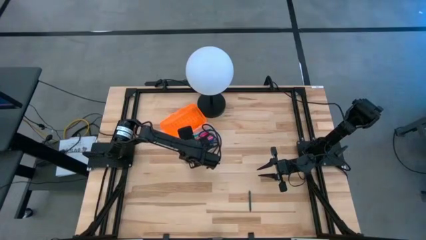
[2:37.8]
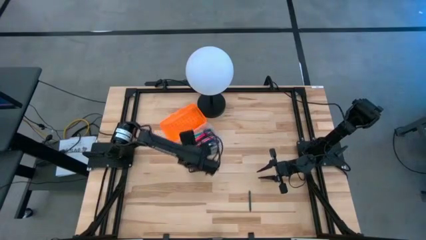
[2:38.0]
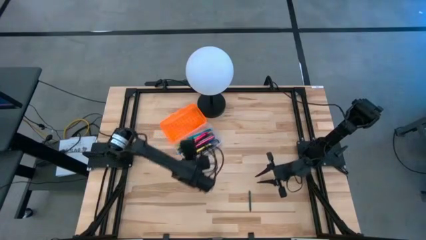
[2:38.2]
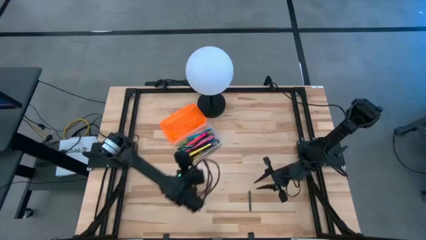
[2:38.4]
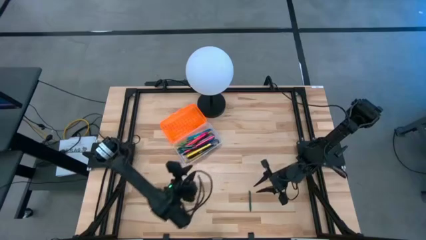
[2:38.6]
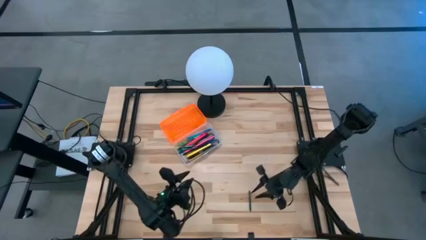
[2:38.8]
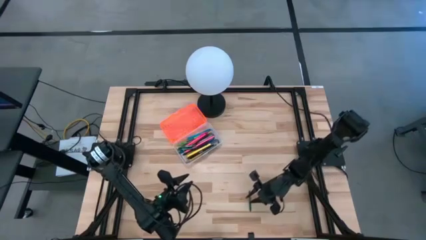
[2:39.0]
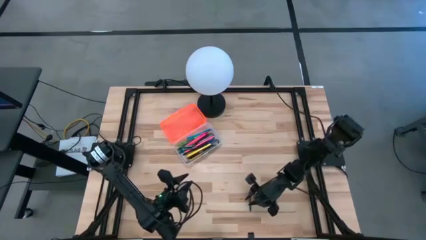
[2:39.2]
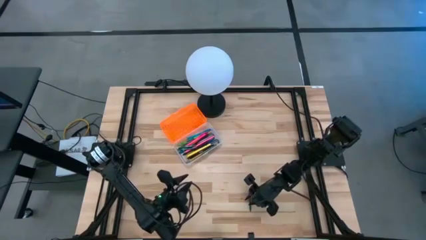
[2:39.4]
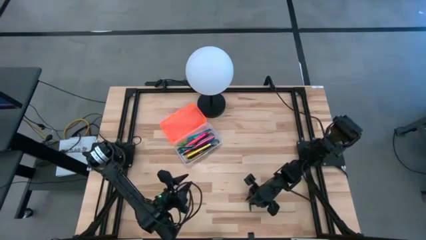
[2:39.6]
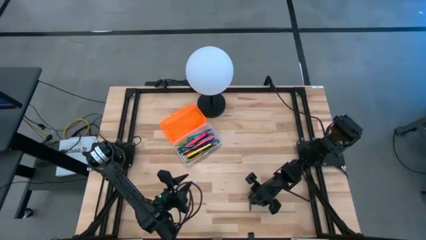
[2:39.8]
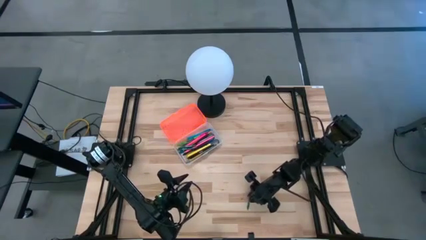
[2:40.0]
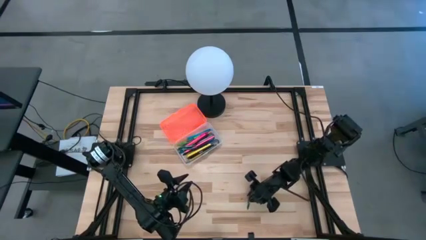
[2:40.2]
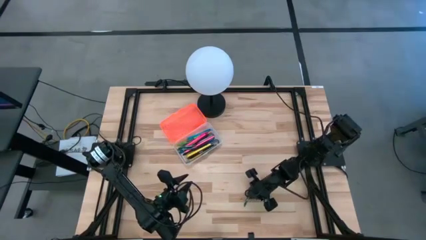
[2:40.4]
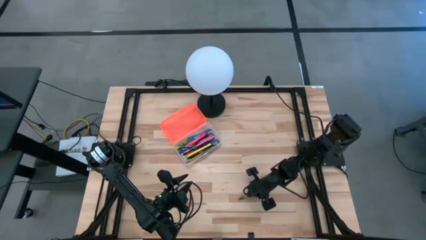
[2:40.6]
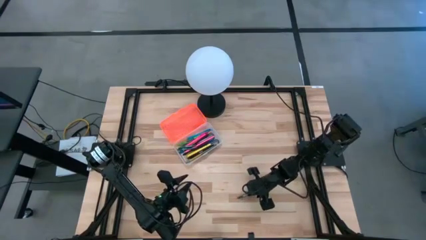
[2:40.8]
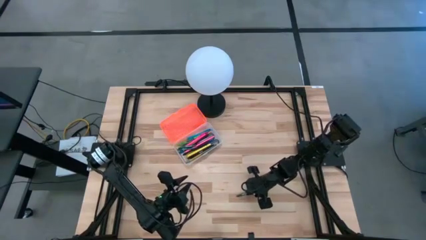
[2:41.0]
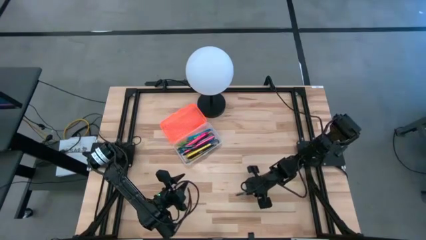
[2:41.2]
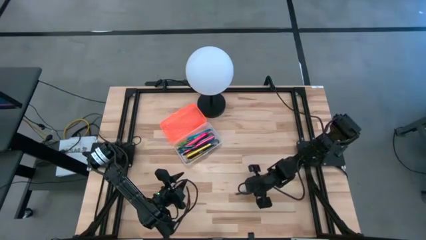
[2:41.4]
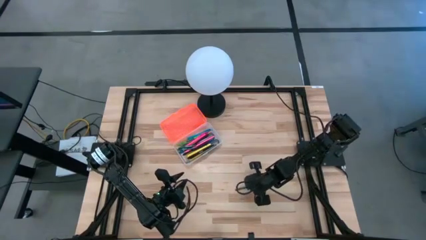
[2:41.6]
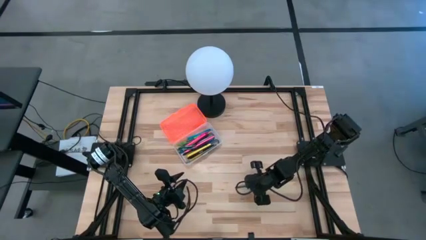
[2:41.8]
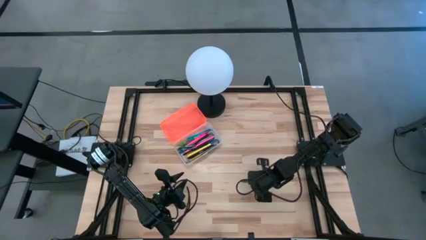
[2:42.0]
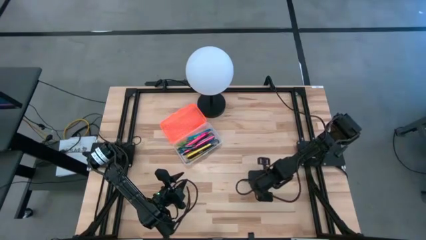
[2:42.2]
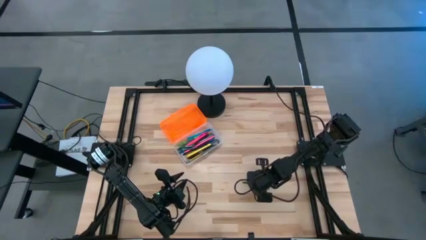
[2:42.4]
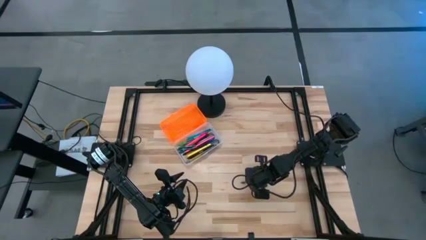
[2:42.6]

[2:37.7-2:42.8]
Task: Pick & place school supplies into a supply box
Put the green crayon into the orange supply box

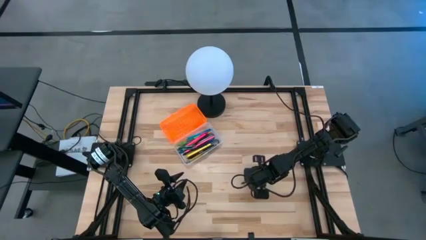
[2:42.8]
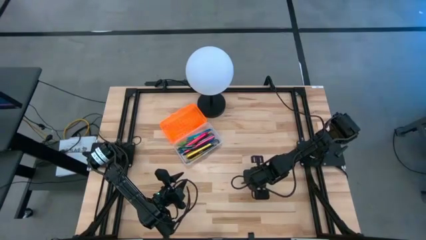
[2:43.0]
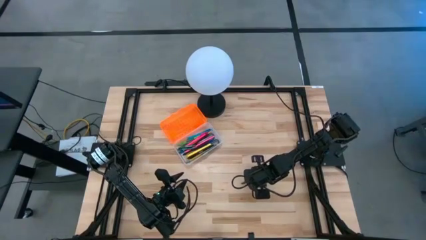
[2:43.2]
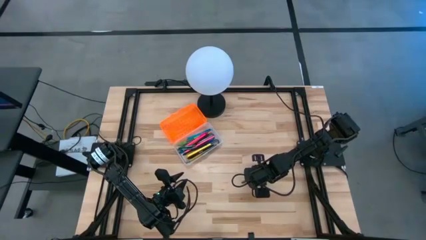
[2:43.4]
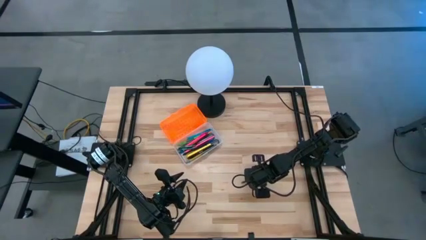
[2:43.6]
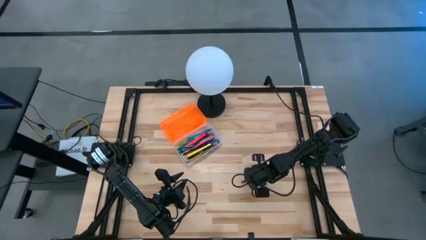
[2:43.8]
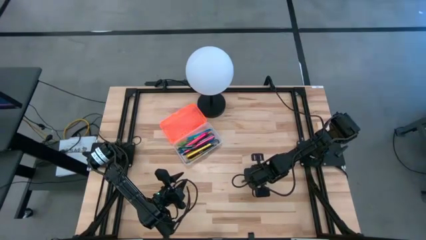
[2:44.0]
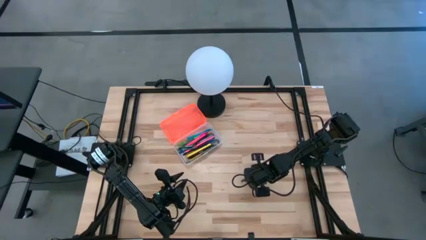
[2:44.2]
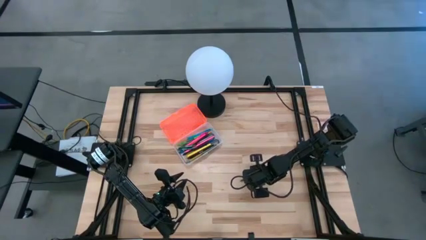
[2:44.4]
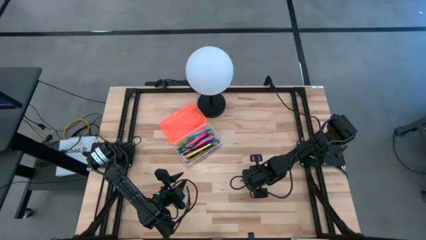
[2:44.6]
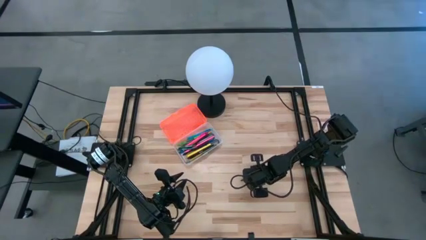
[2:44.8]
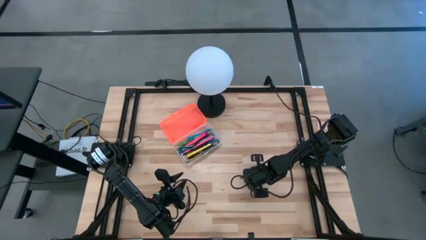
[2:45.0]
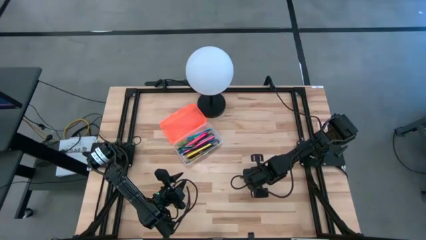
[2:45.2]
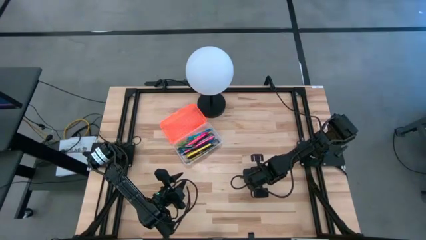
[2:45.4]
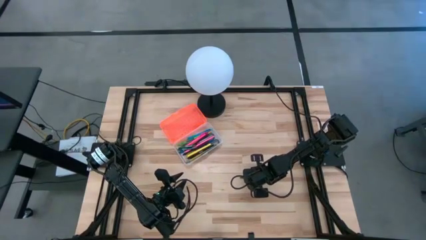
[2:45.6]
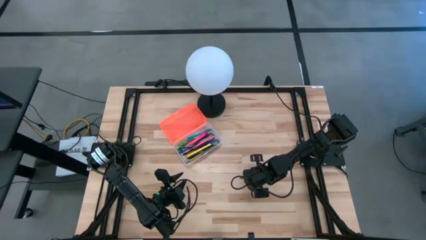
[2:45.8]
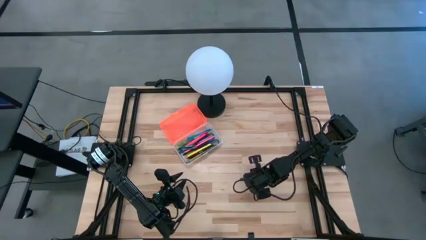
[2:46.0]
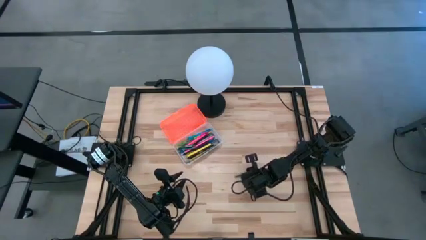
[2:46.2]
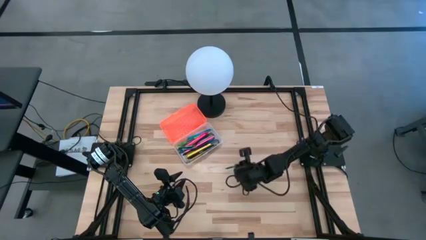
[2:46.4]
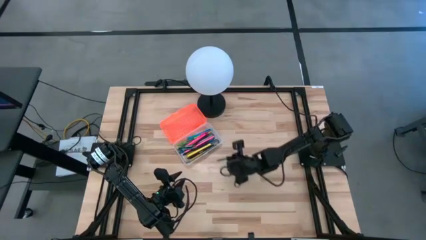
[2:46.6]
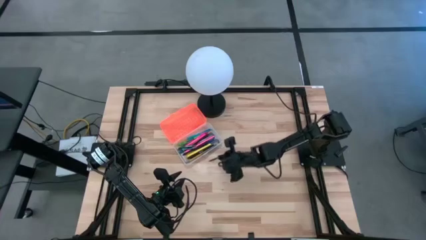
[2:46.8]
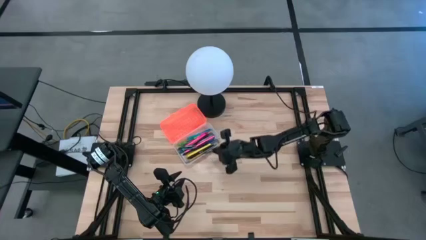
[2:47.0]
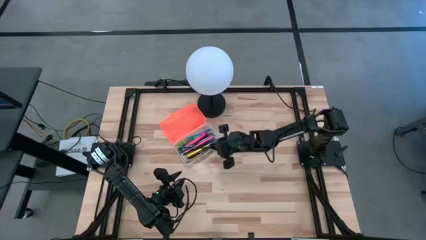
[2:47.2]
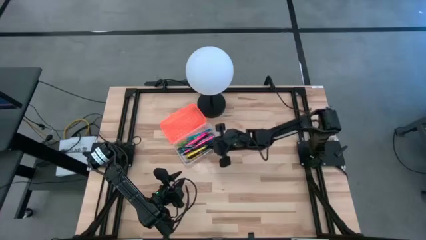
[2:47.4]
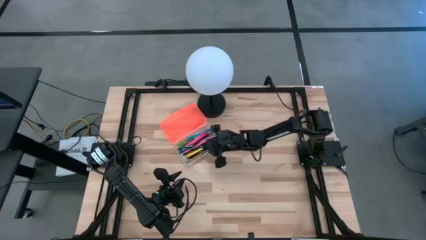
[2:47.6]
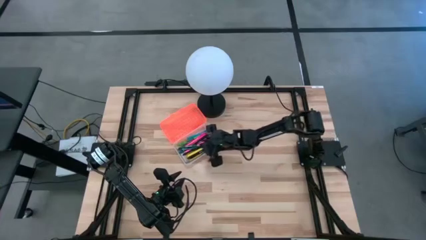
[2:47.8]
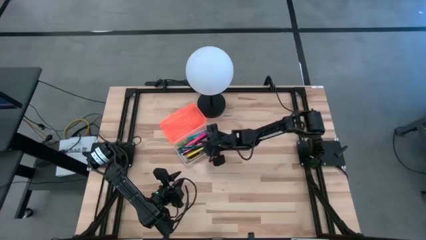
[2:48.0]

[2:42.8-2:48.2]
Put the green crayon into the orange supply box

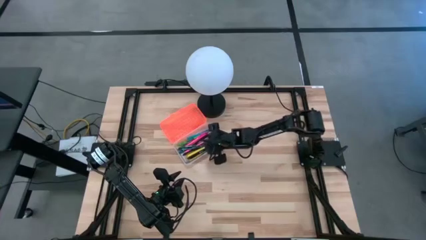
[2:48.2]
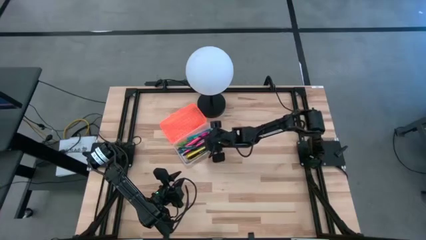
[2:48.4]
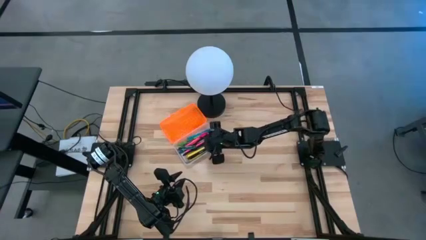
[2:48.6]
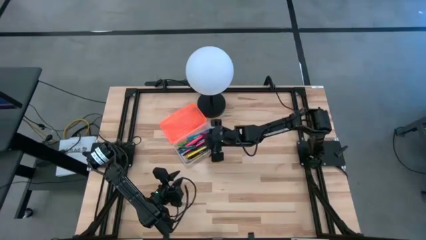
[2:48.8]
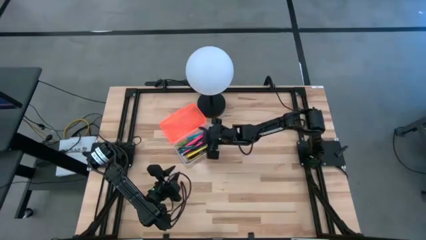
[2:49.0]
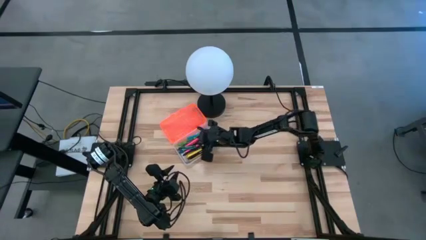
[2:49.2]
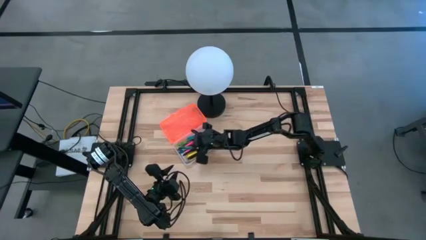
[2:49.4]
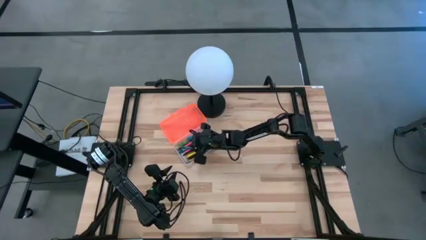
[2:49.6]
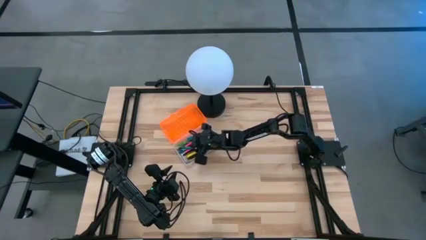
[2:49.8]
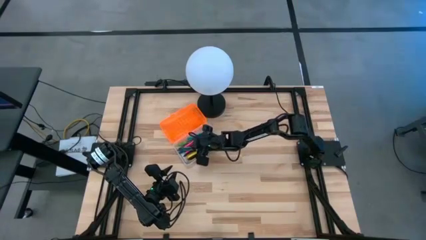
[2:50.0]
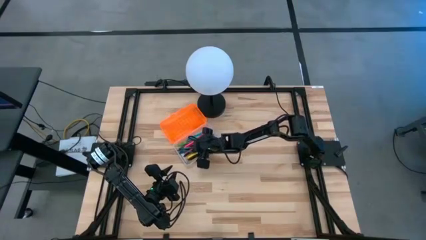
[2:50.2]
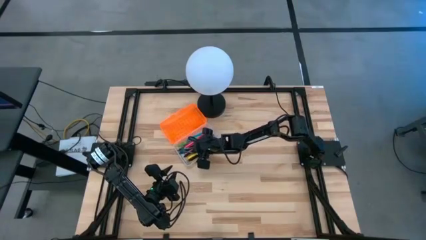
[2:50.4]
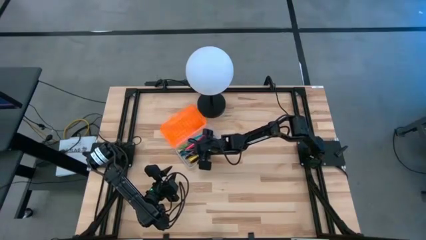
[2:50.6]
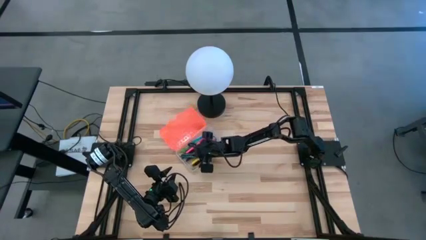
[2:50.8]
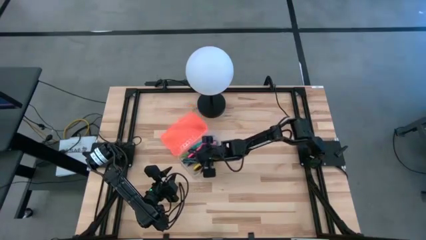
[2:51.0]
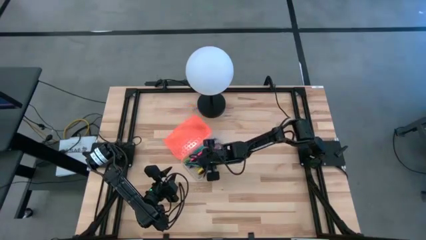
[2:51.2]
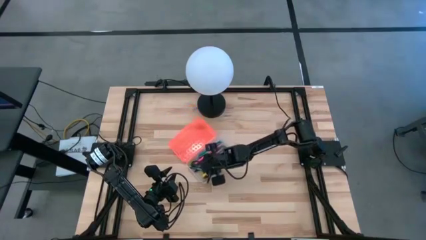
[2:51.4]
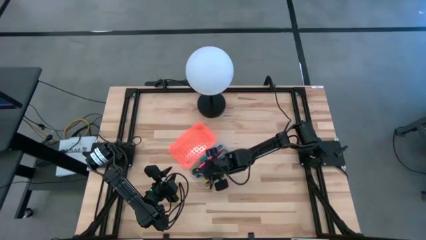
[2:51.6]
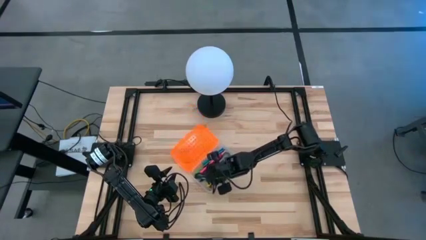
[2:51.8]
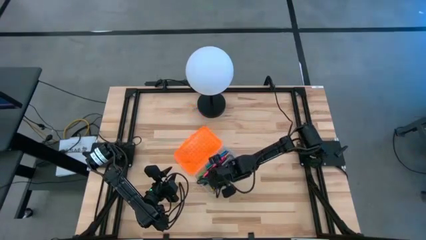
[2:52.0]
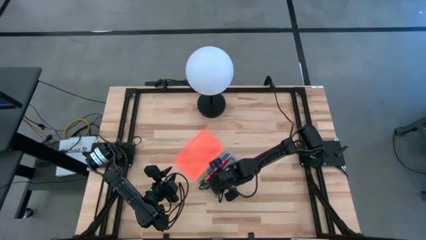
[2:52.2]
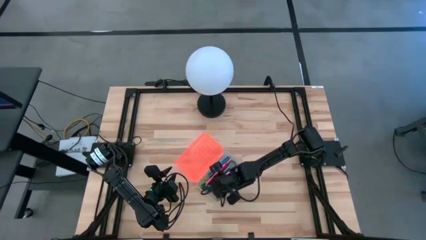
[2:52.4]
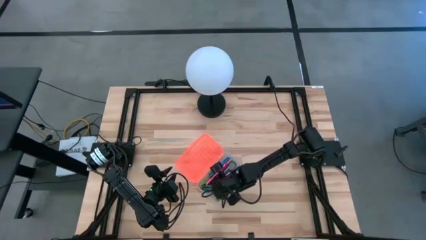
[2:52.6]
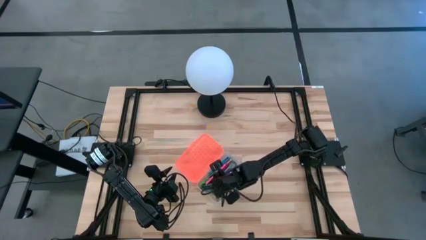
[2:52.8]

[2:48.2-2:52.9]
Move the orange supply box to the center of the table
